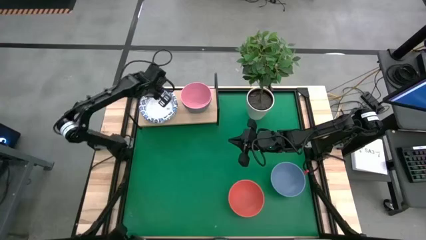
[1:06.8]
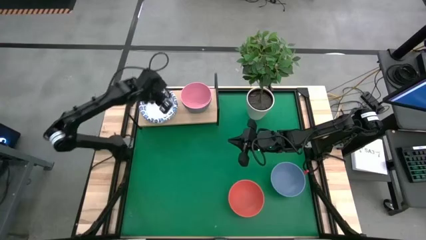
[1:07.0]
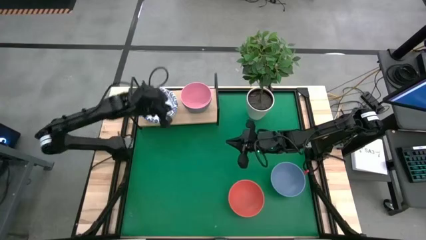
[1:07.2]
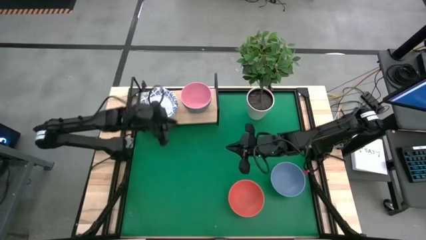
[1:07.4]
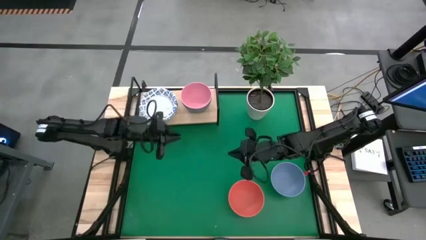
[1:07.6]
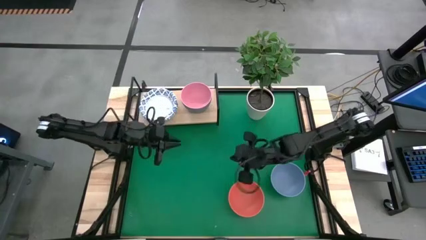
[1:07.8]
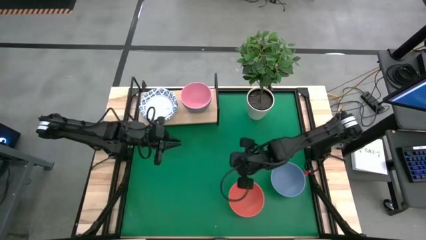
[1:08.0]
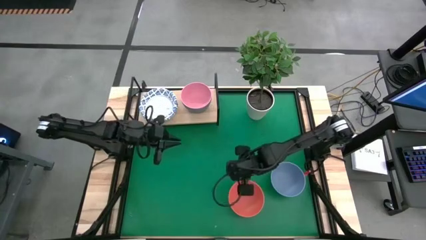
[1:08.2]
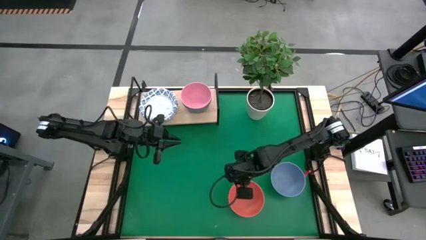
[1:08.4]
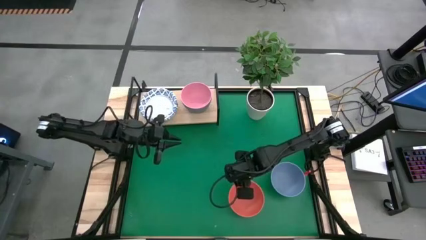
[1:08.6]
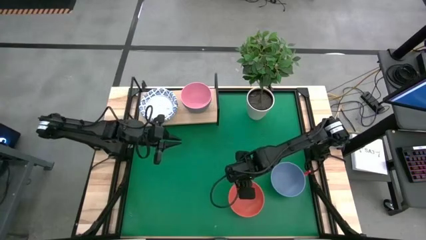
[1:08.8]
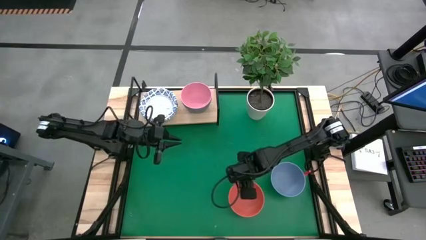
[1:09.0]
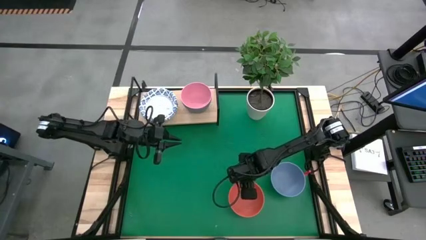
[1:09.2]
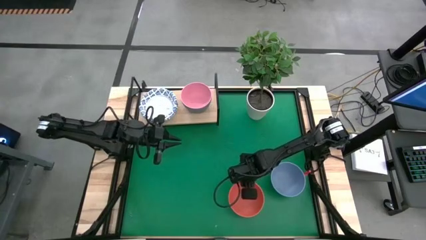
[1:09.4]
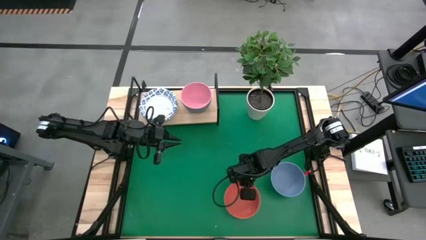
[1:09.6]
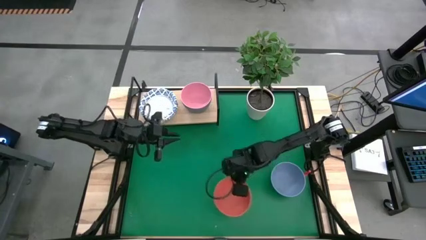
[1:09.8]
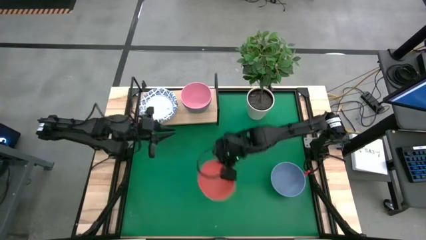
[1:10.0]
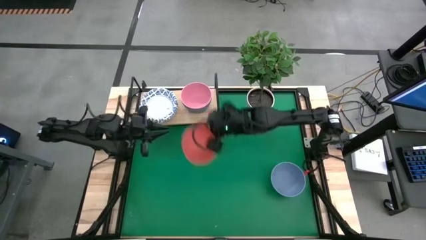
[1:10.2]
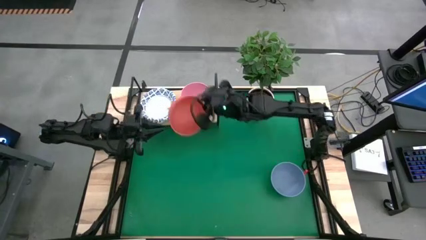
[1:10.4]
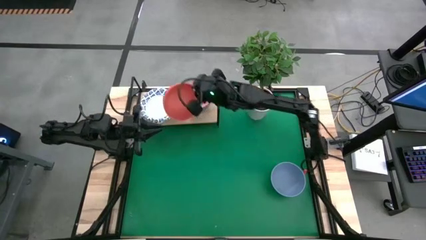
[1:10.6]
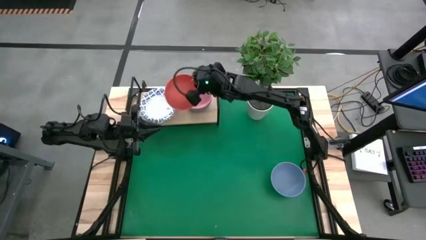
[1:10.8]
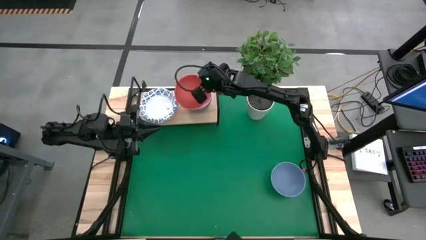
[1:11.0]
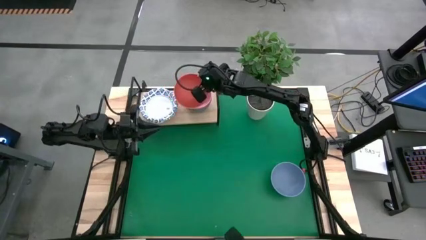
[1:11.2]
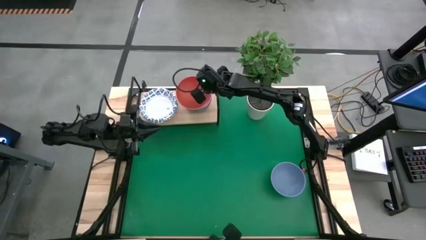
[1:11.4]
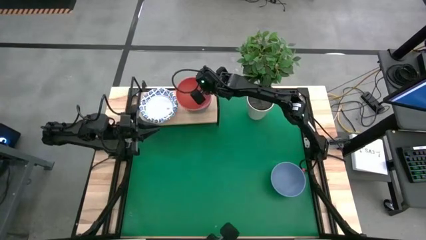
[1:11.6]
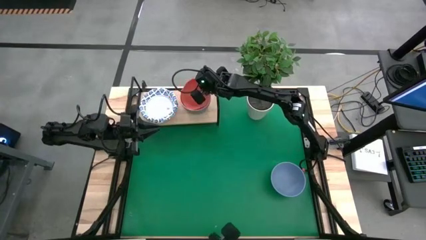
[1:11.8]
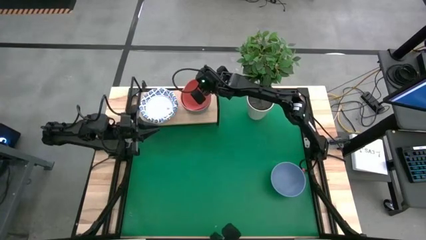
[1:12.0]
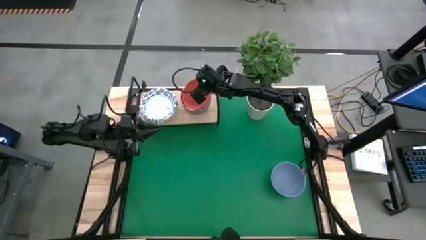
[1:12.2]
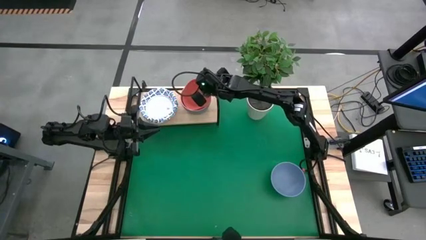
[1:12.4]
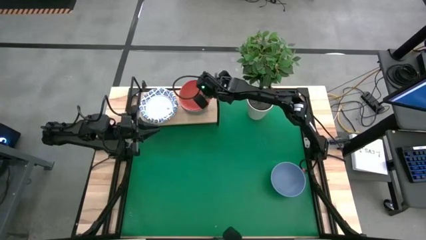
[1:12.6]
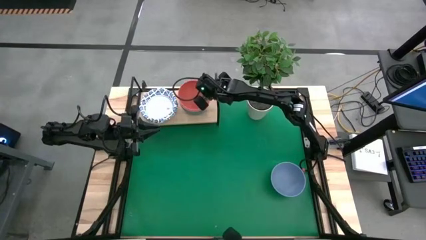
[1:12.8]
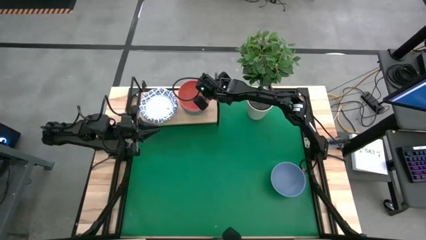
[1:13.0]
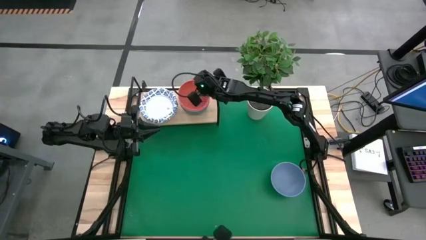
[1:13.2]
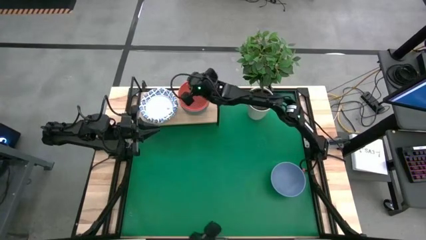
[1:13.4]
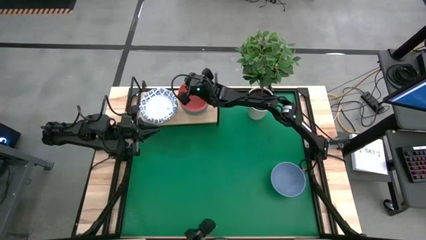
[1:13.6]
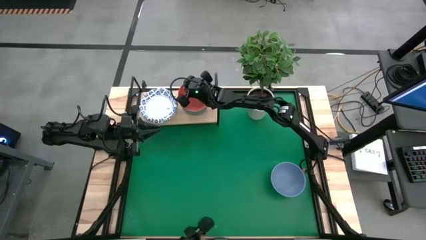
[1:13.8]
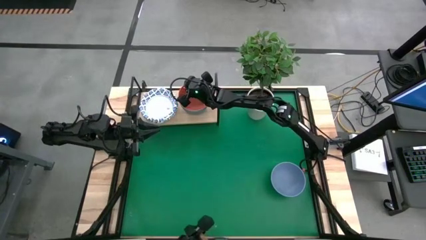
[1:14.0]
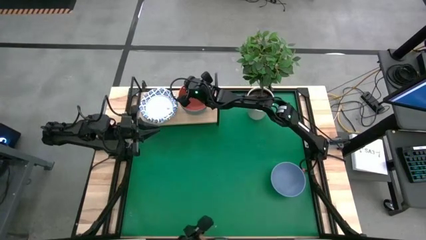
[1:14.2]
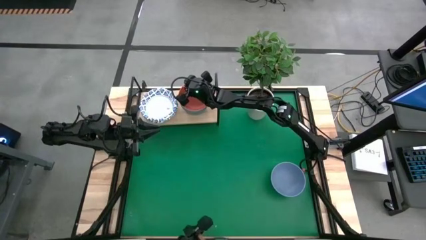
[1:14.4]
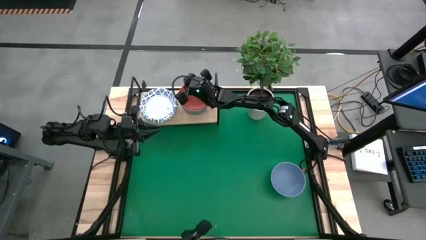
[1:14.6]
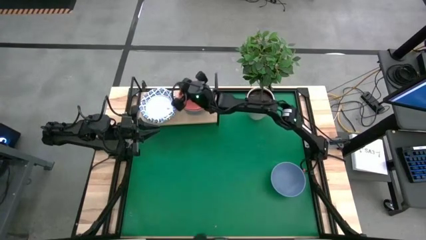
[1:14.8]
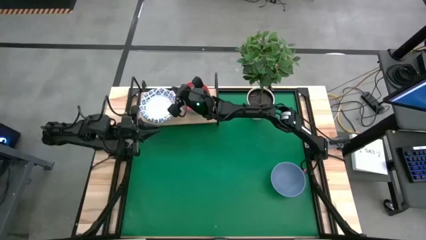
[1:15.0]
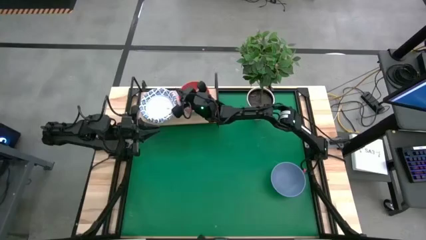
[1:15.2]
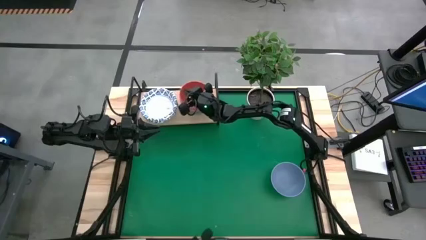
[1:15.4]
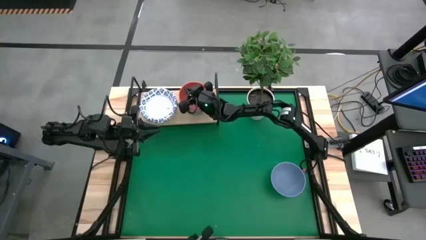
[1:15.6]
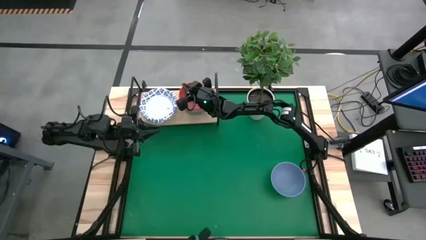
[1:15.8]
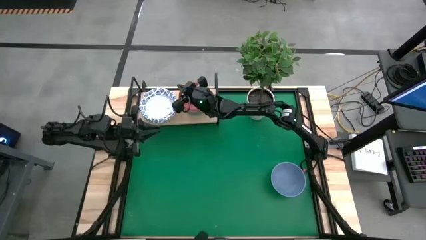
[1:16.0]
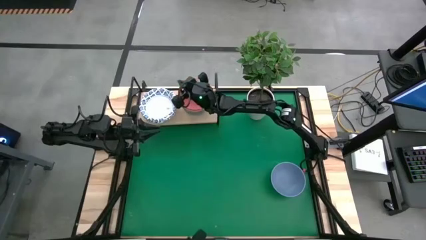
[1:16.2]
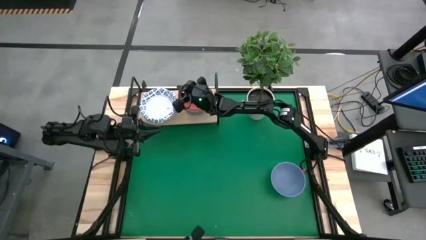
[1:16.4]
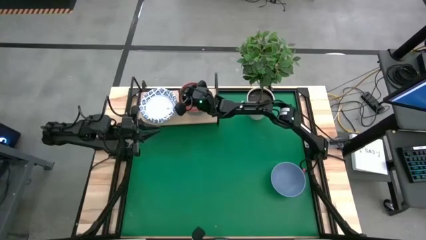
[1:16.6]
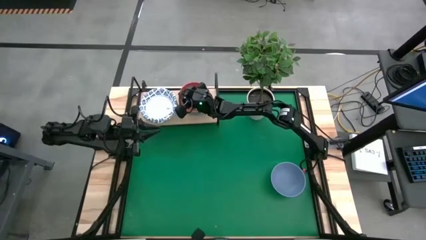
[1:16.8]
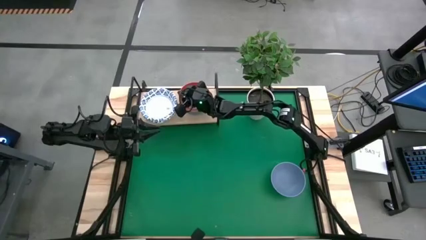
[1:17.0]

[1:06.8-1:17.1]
Task: Place and stack bowls onto a shelf
Stack the orange bowl on top of the pink bowl

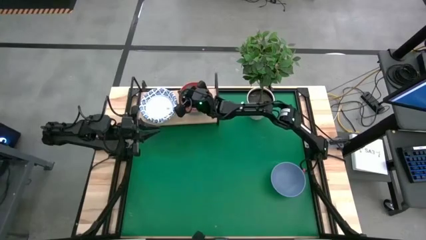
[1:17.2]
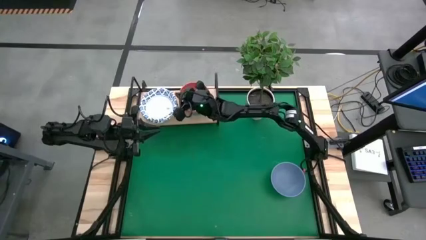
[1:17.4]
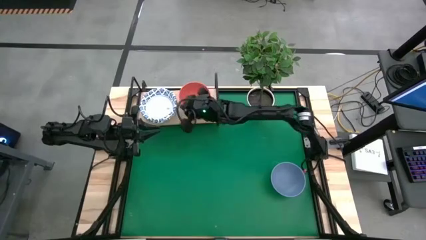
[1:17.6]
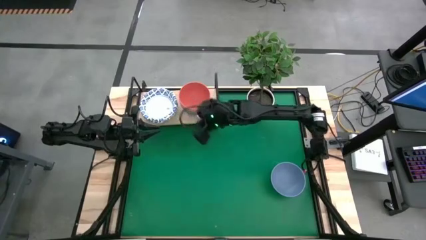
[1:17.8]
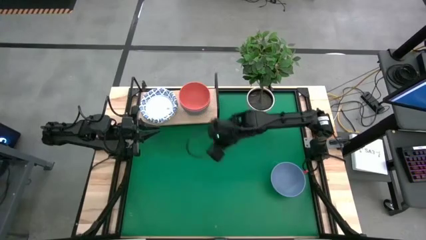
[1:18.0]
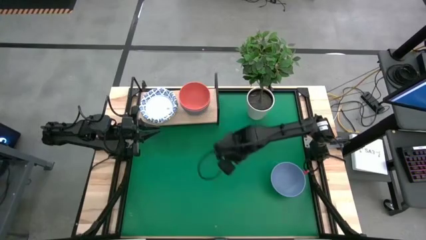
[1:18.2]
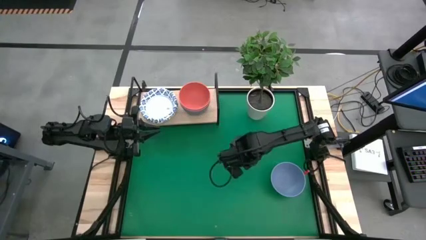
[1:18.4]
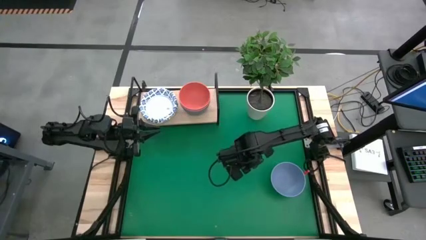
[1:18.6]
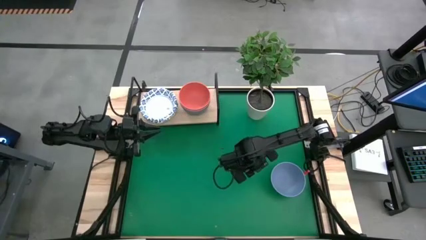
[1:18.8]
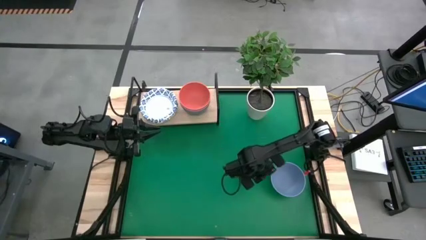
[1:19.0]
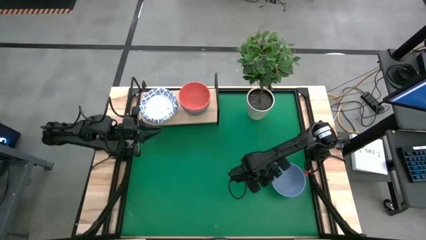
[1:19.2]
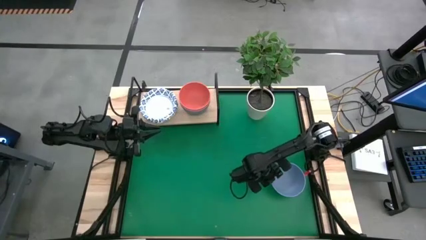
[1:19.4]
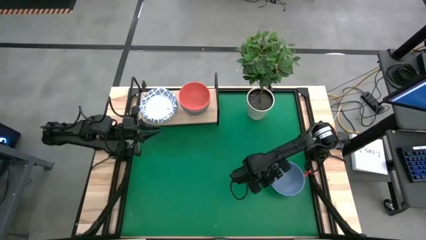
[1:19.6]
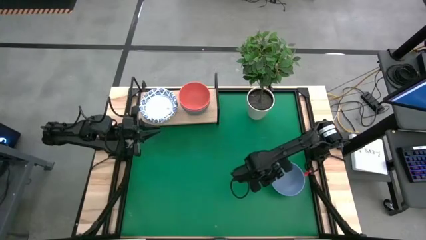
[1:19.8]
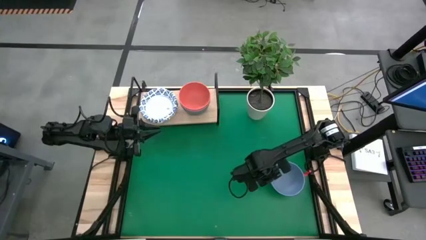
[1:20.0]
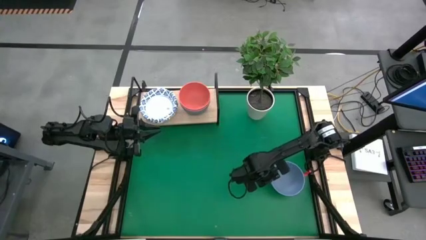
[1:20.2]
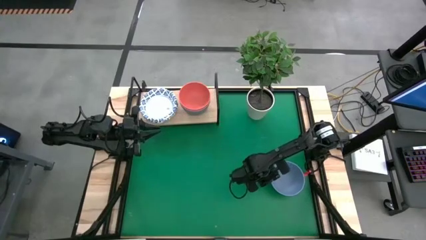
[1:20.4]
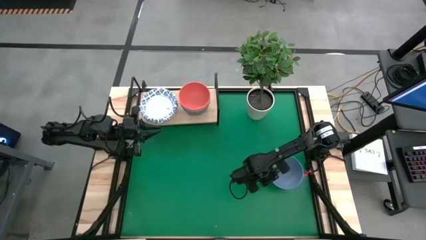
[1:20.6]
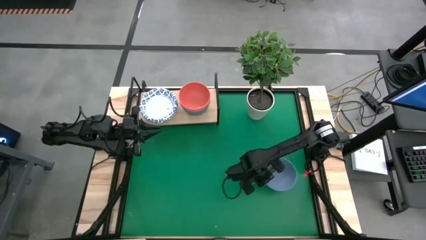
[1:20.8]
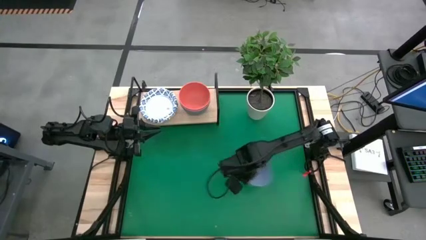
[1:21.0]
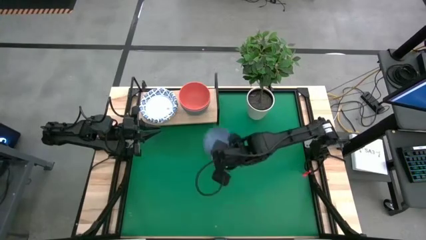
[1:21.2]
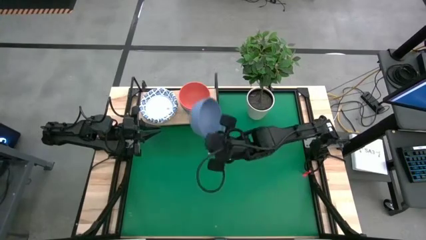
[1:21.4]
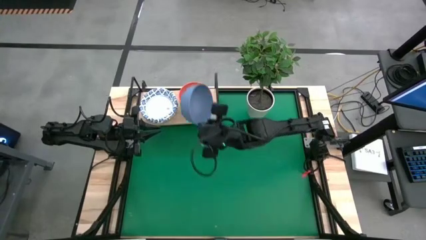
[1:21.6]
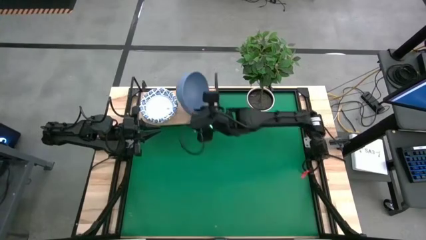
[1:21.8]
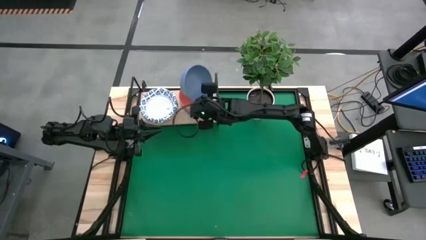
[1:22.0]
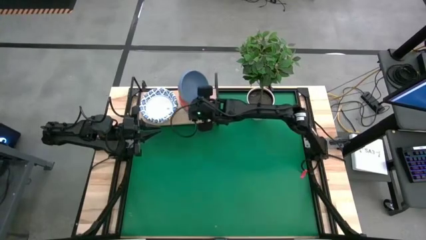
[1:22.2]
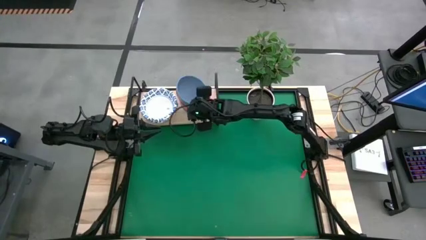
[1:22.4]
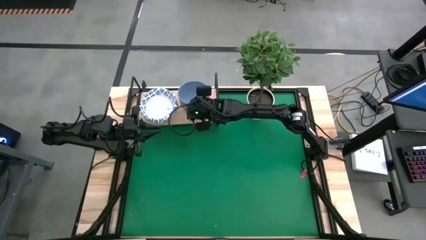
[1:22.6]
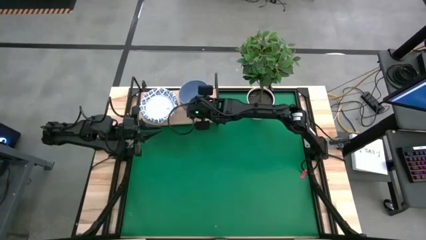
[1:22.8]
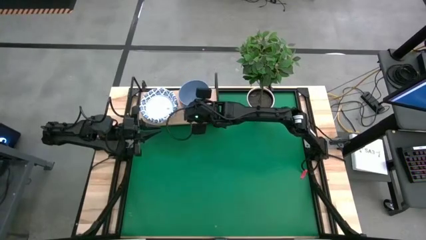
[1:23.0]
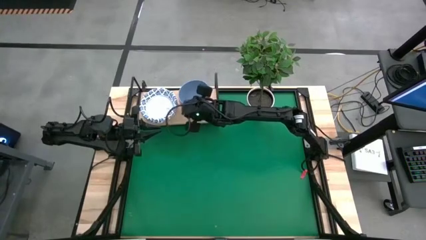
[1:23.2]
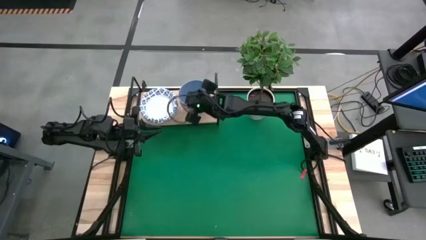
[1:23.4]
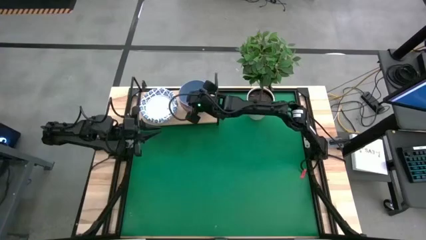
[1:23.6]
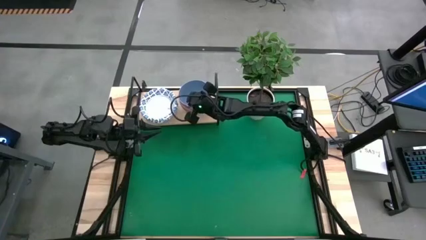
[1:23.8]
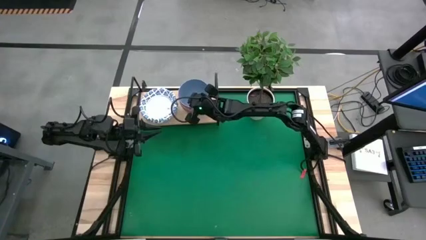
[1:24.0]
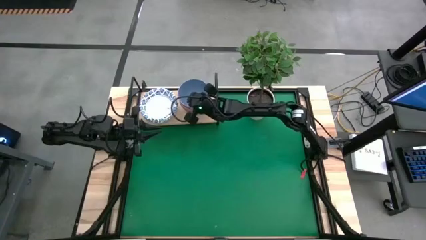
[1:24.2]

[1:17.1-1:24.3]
Stack the blue bowl on top of the orange bowl
